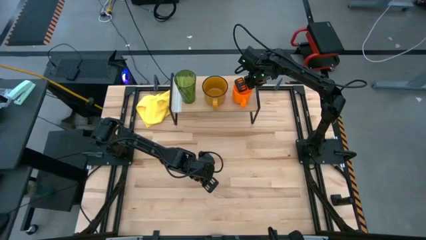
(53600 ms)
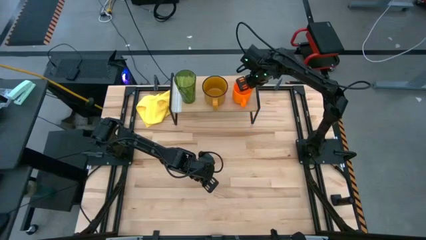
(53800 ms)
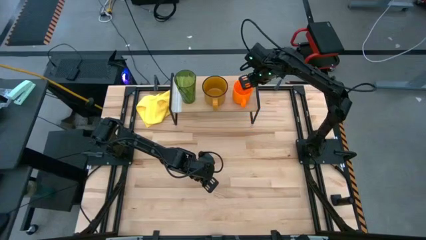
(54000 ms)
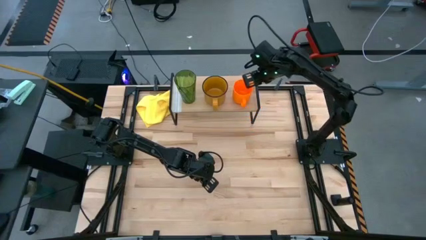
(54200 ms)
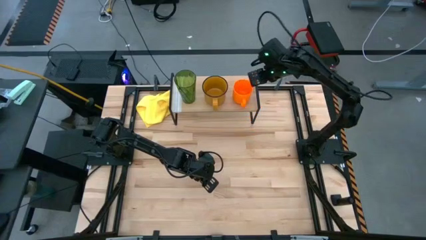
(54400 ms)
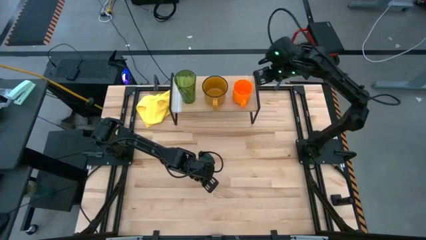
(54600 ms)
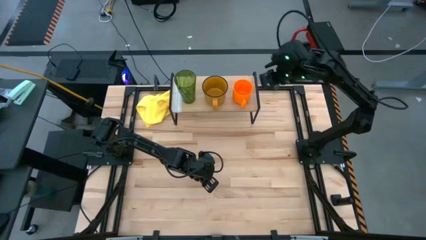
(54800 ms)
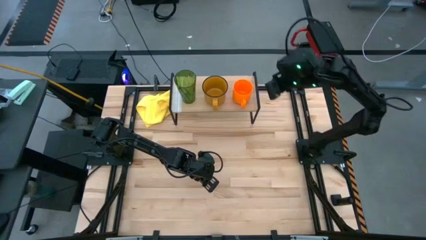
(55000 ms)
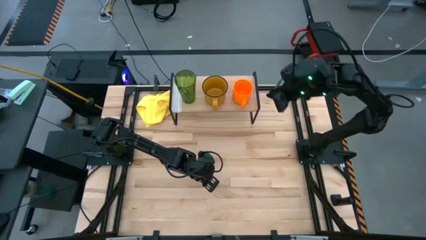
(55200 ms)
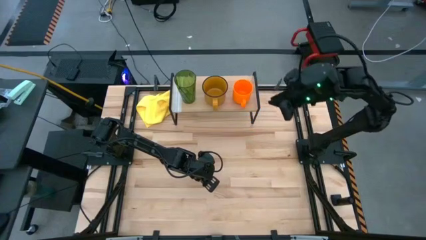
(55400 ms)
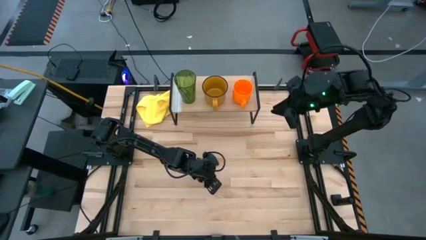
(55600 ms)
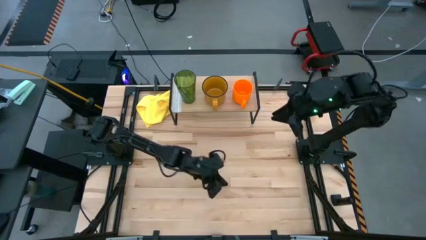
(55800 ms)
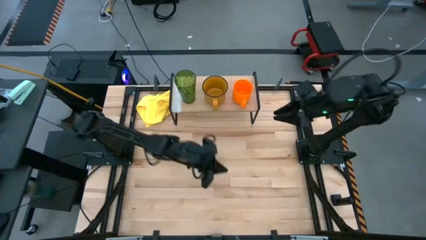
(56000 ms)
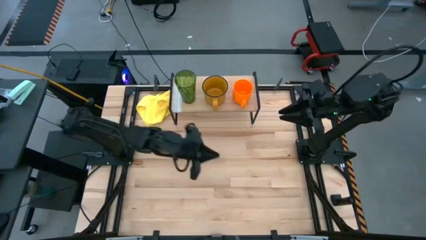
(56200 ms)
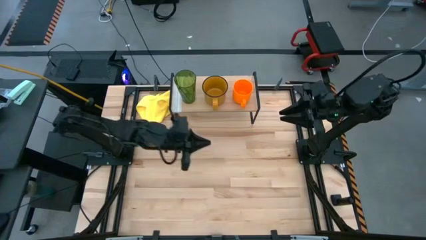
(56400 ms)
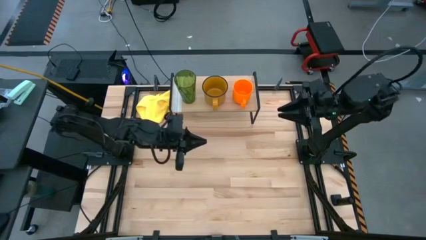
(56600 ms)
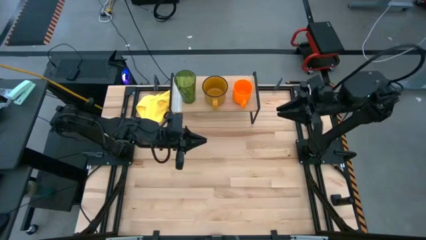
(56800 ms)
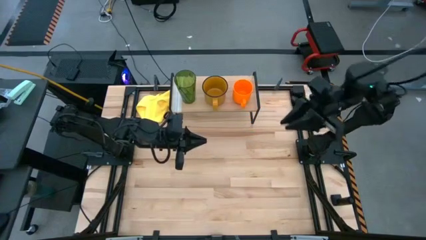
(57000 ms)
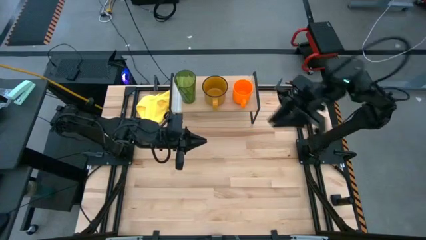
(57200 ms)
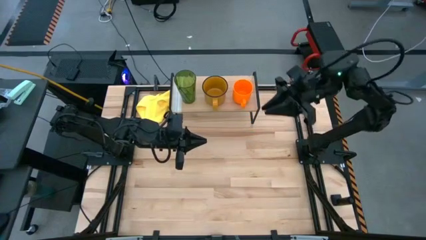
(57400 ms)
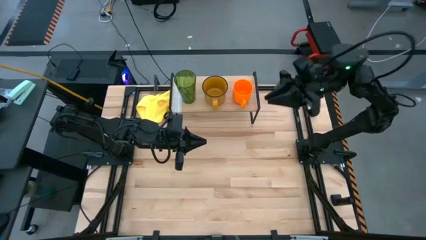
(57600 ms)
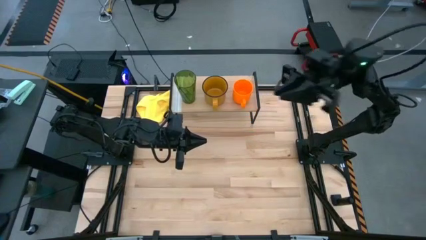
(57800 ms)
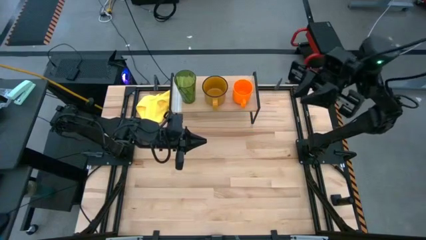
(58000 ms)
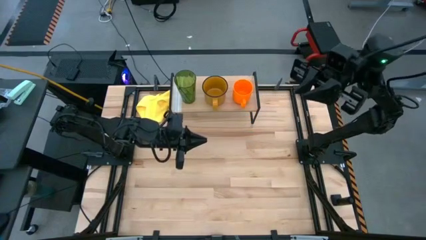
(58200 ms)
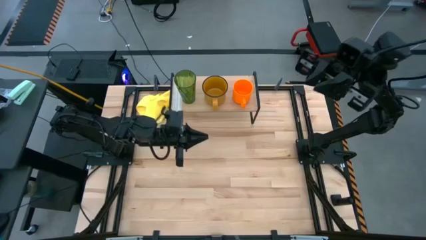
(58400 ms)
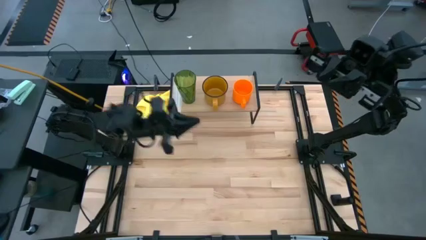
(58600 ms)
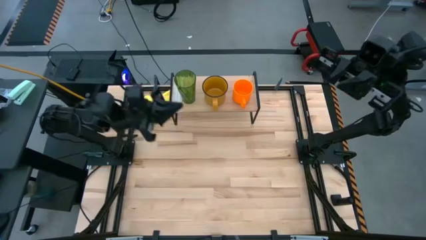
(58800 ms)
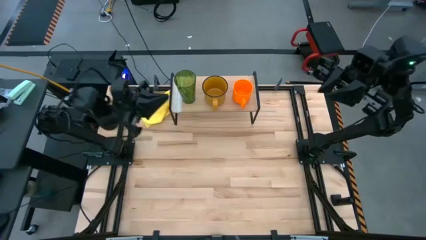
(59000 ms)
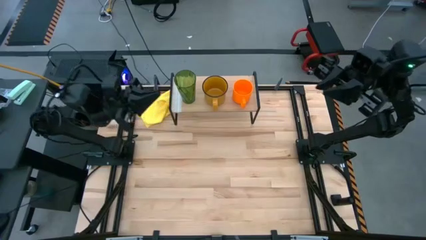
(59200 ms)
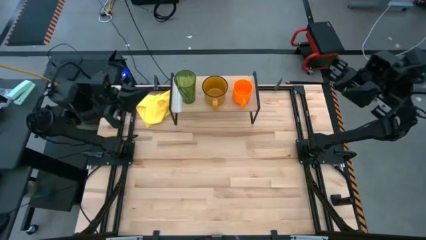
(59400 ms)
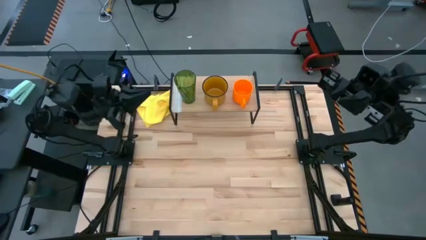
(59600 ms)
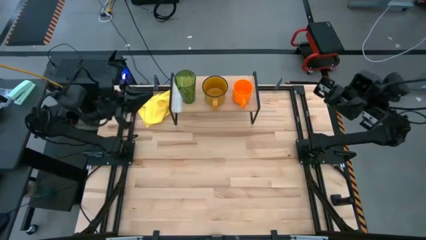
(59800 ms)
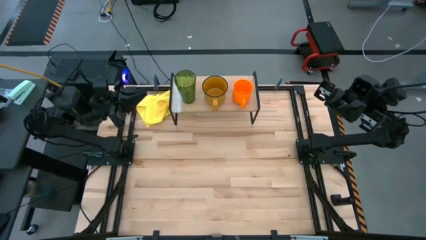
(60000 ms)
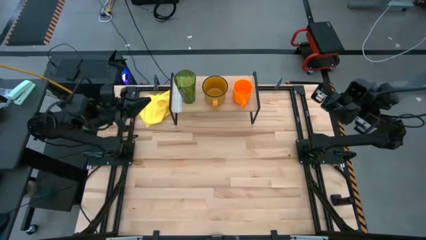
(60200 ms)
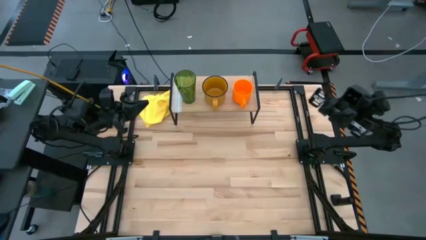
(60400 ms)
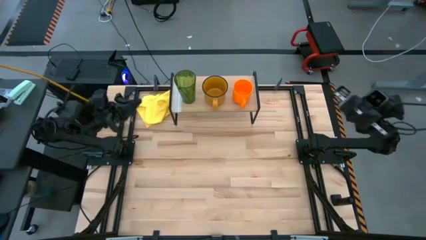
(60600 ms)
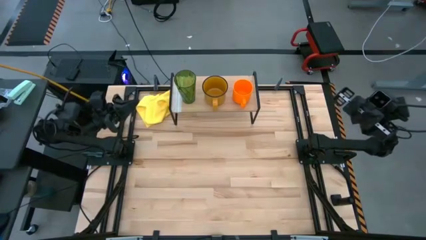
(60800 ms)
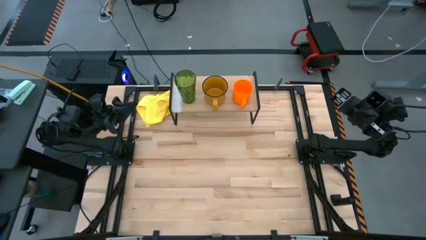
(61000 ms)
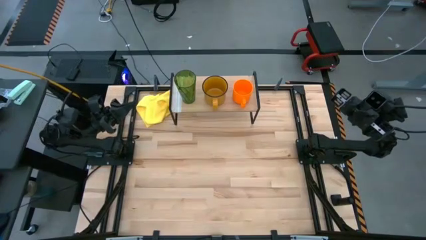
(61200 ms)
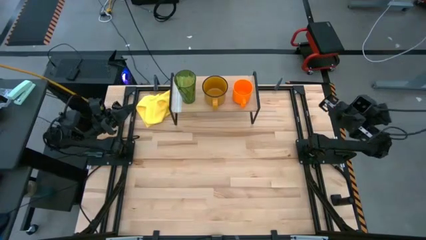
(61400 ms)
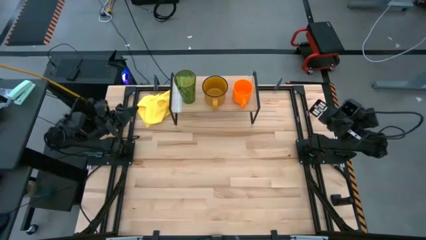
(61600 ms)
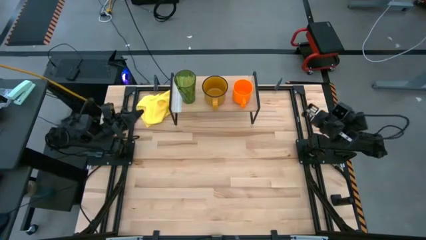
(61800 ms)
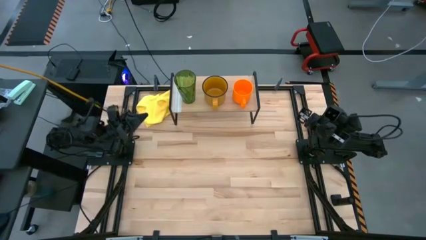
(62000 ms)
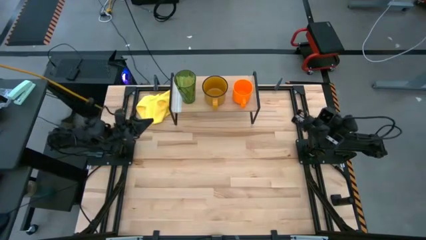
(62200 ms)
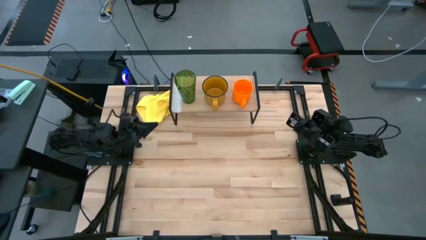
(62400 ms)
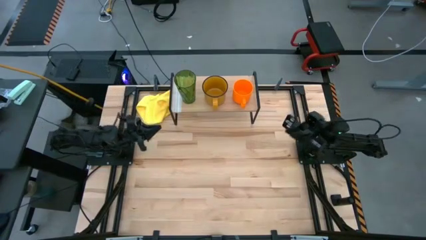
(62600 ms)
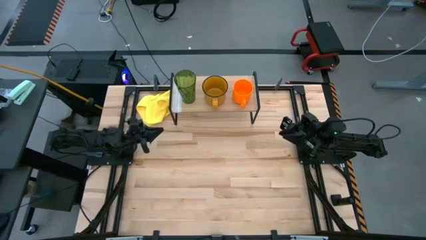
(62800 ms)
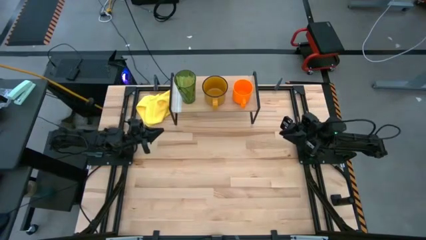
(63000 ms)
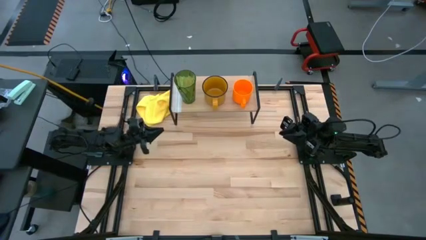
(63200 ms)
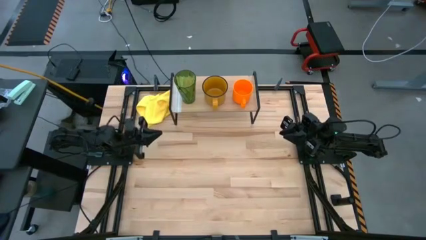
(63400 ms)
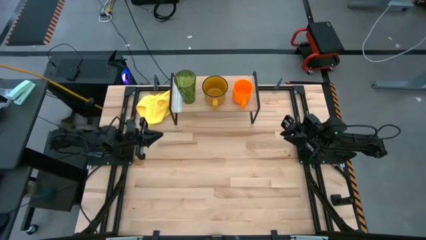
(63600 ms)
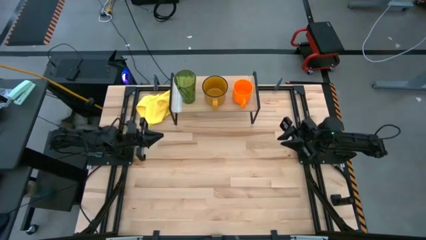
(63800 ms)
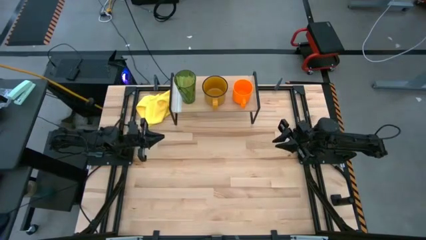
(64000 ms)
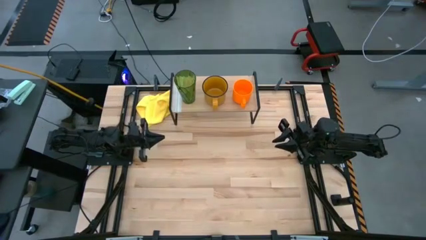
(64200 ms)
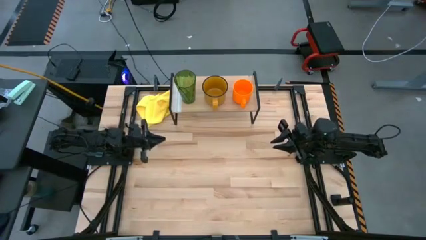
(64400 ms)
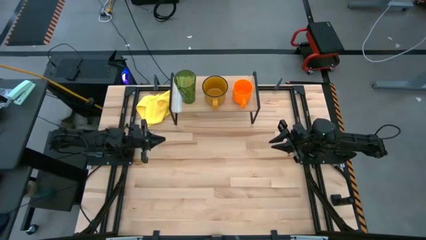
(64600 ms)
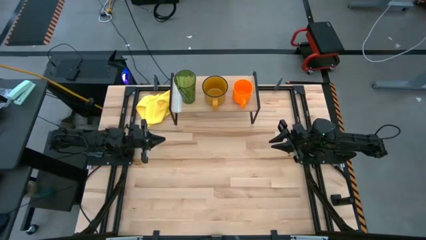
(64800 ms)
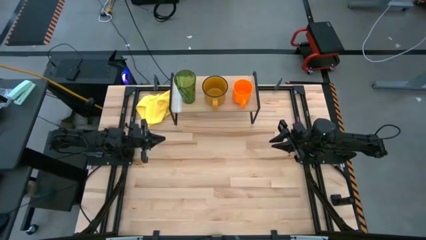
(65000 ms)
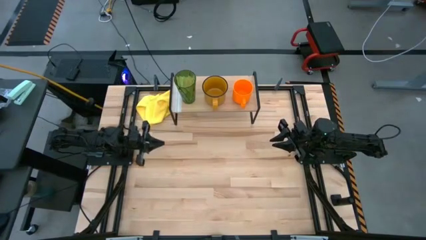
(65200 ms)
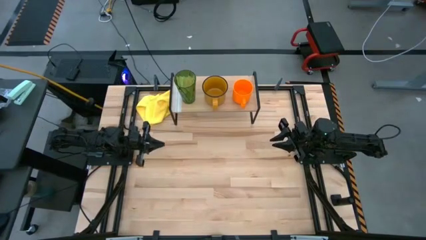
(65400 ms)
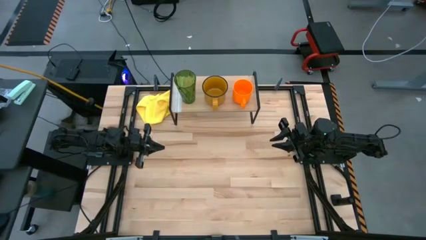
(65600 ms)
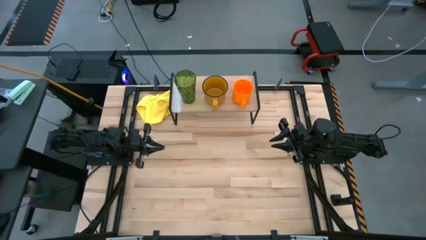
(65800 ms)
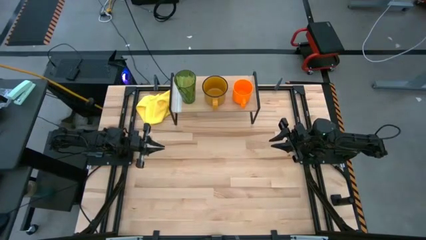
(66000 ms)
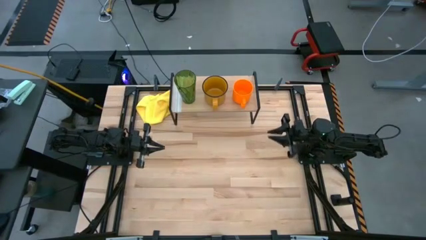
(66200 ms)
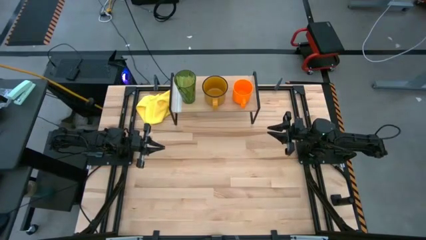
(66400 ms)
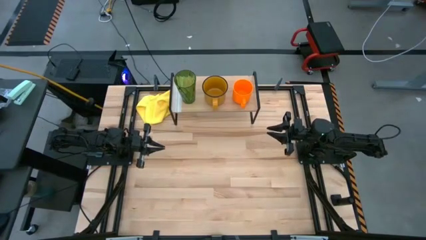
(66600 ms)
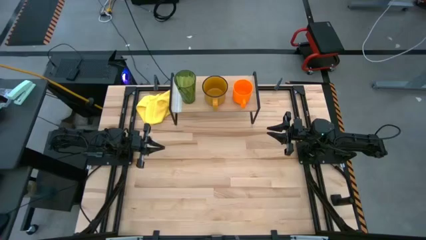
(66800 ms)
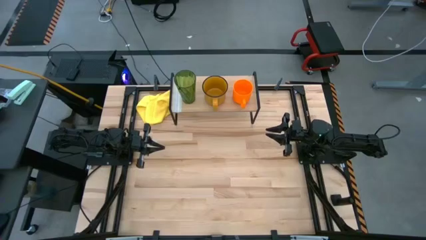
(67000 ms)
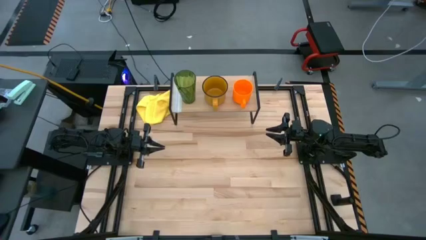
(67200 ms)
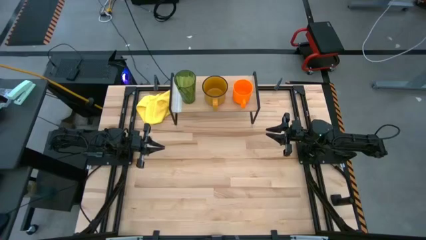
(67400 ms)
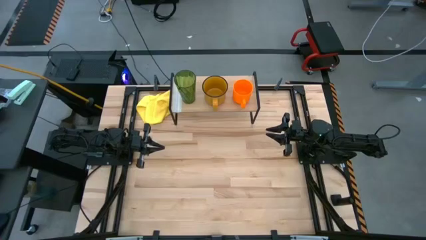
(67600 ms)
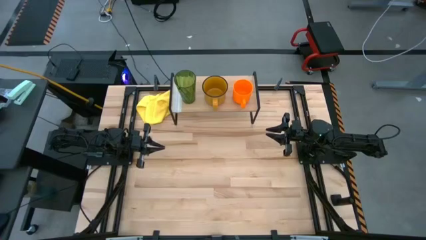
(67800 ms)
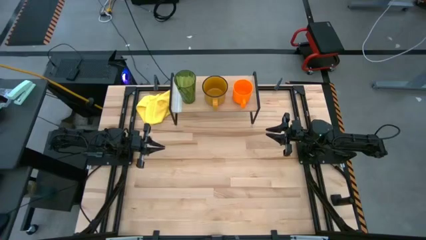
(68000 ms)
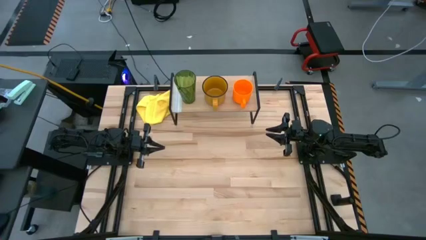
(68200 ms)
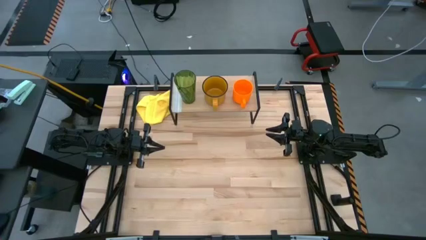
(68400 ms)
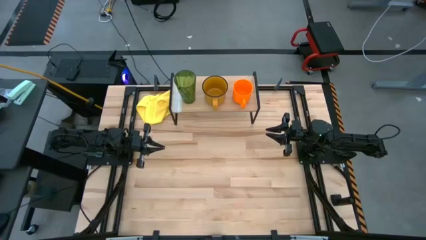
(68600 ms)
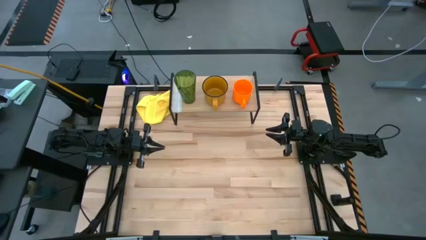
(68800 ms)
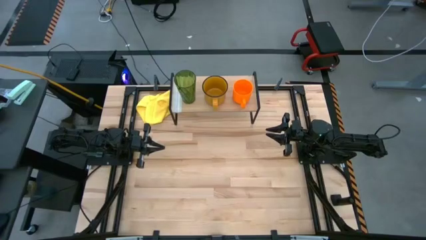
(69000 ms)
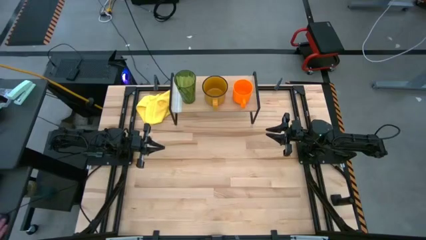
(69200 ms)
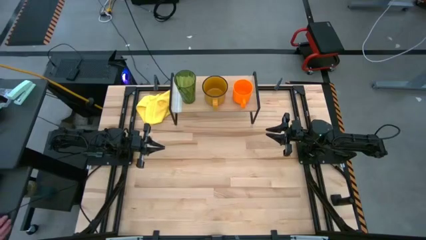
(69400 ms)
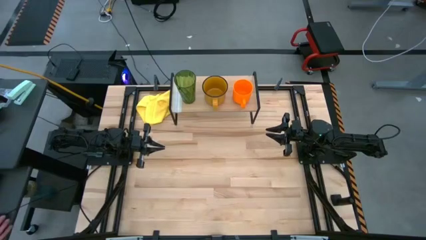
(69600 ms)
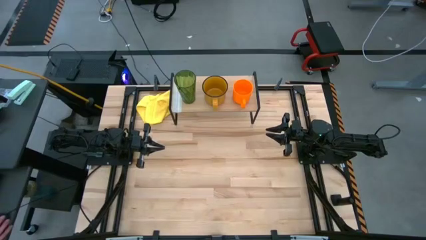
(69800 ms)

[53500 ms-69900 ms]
Task: Stack small to large cups/mugs on shelf
Return to Home Position
